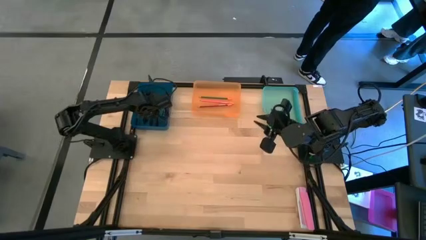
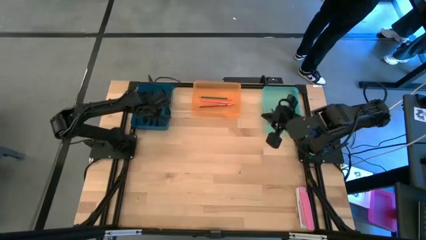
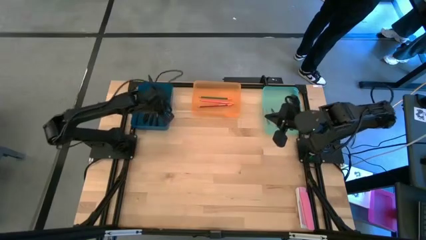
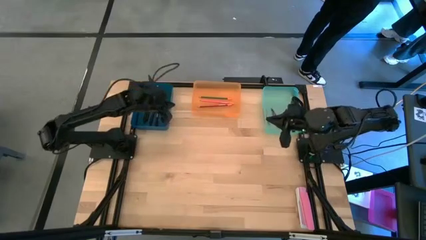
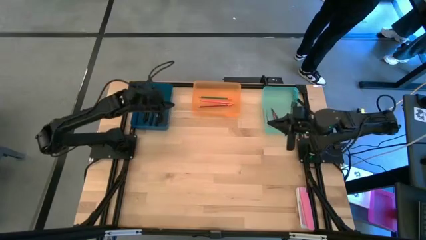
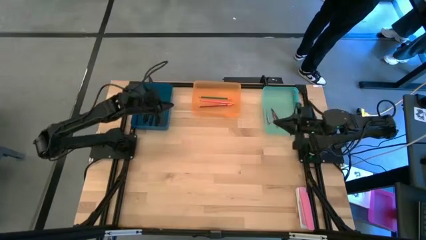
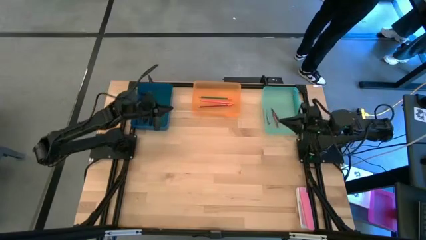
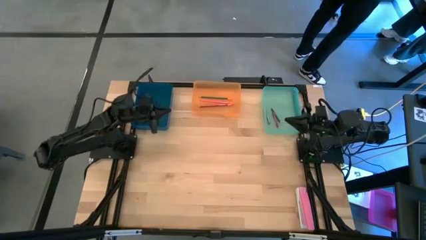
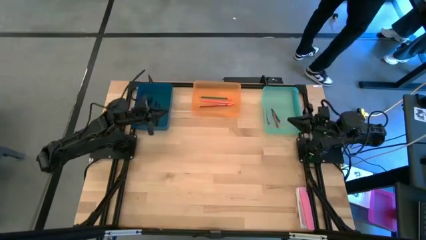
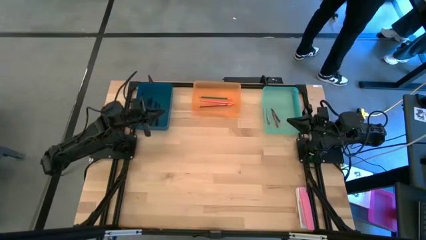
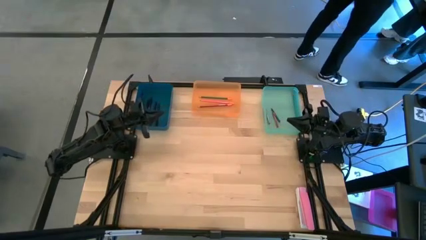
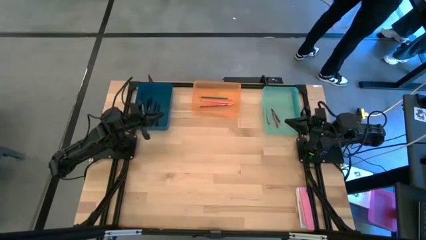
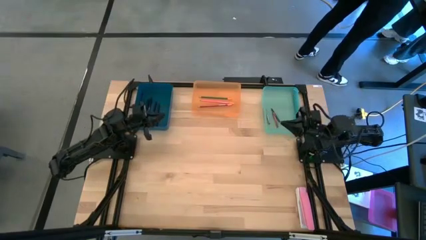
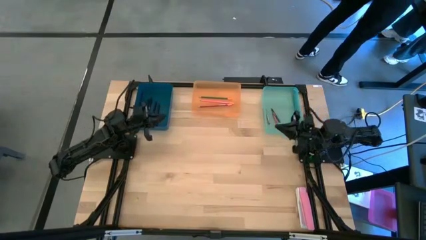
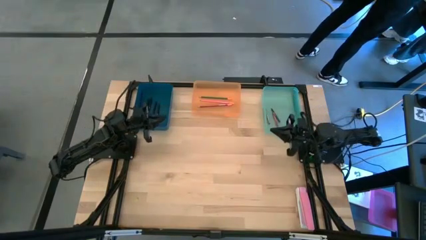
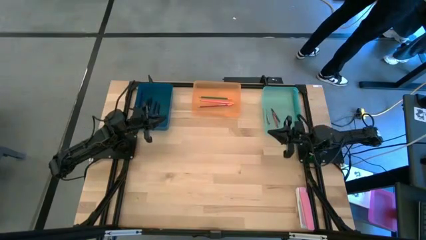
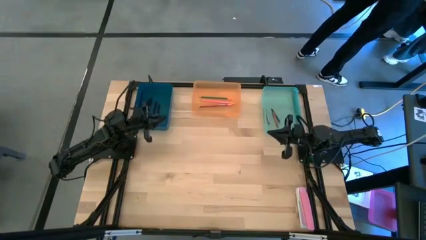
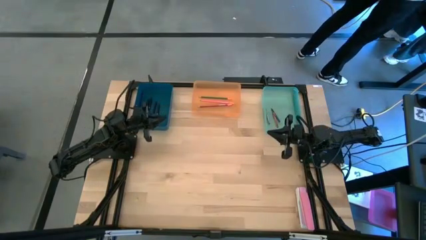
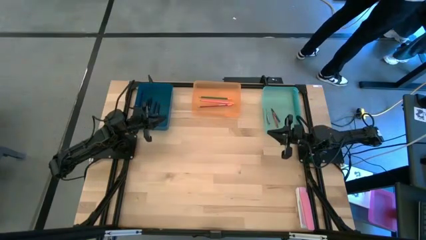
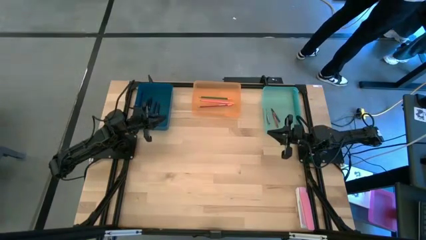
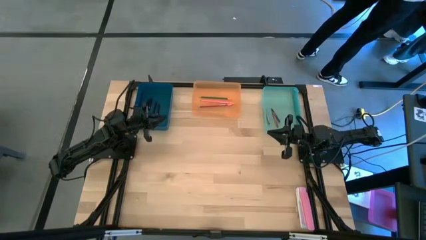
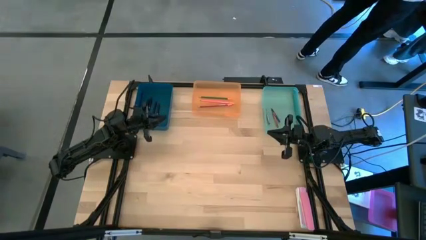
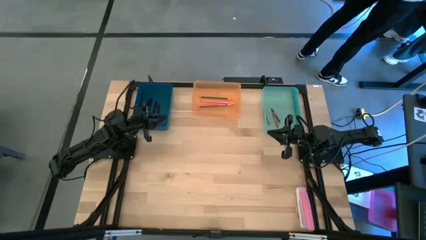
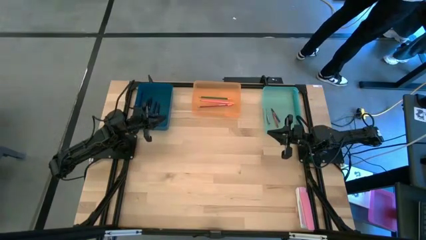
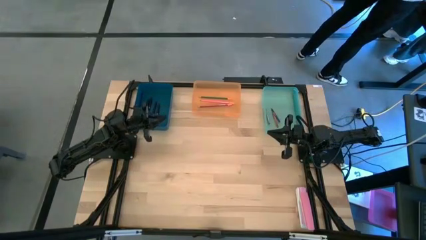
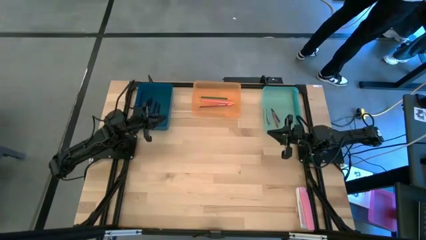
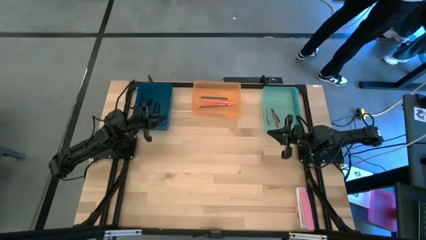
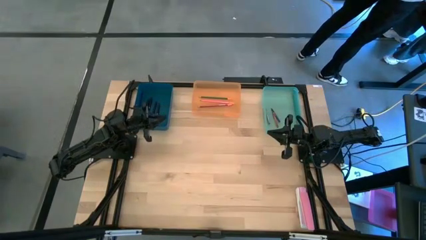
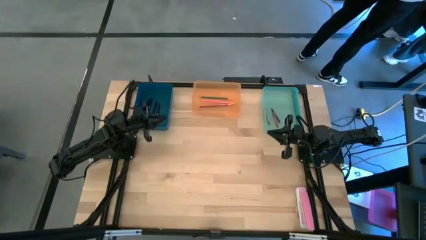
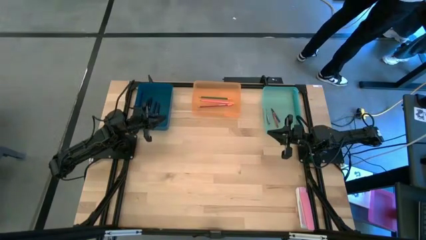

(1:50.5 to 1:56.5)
Task: Sort crayons/erasers/pens/pencils in bins
Return to Home Position

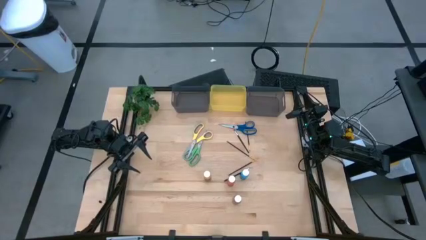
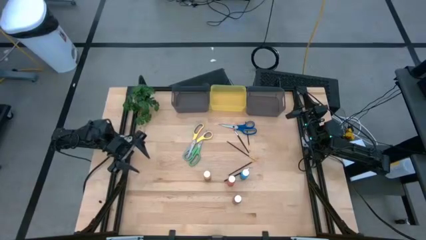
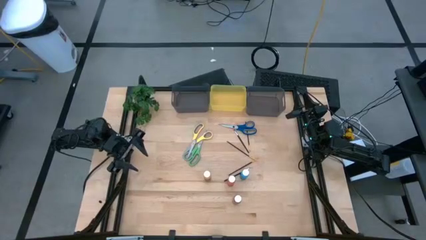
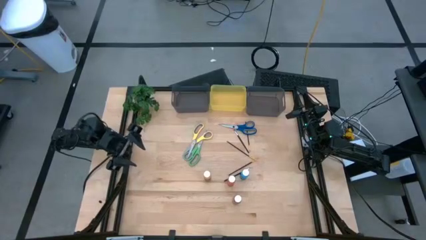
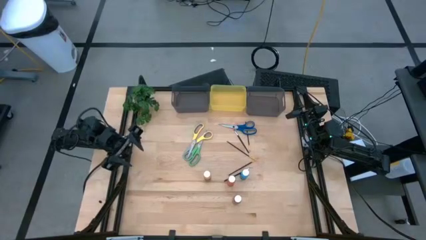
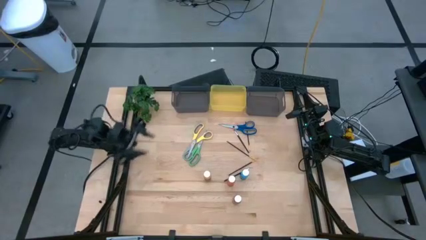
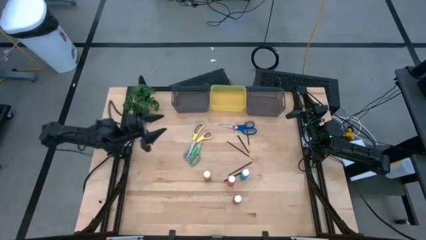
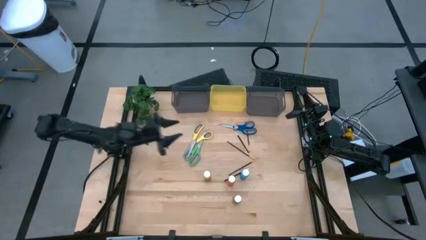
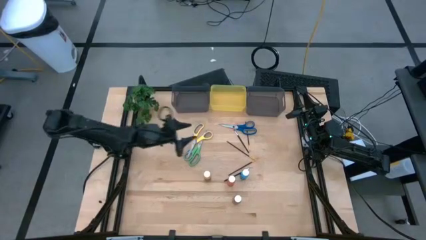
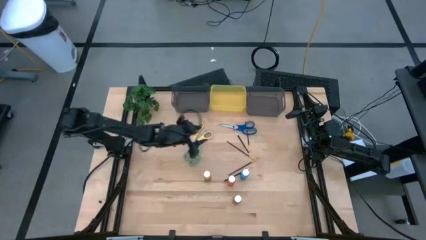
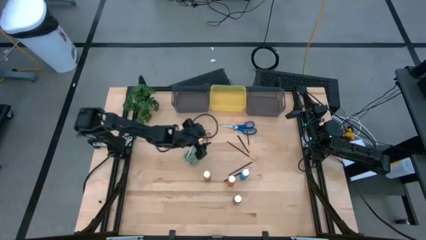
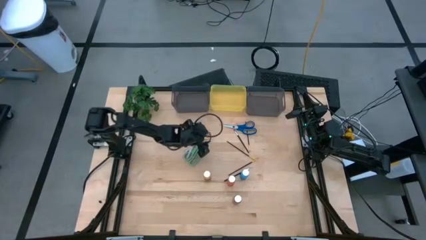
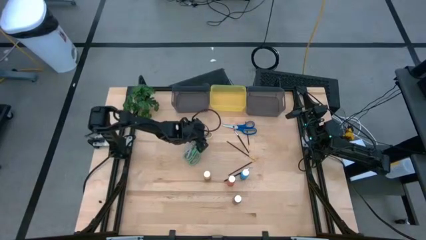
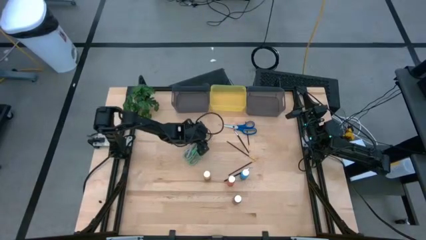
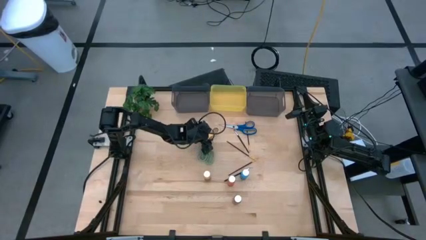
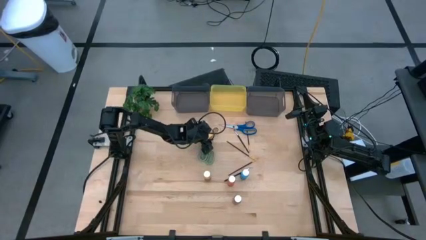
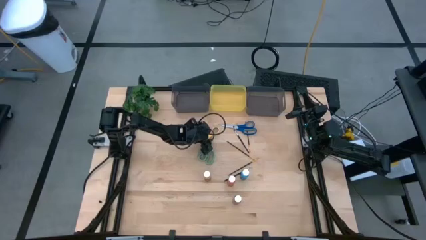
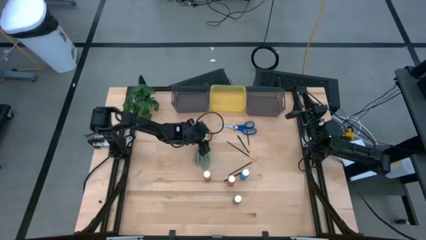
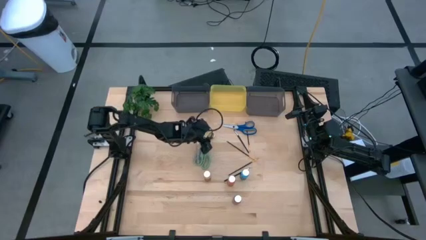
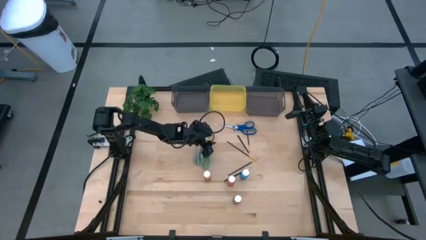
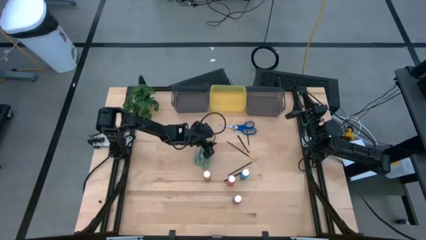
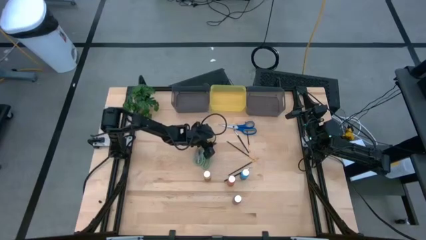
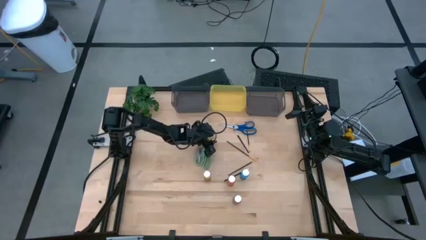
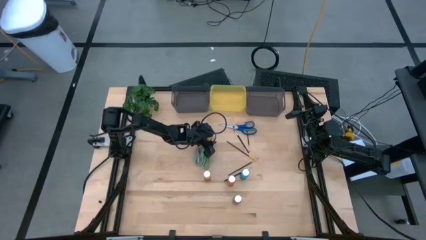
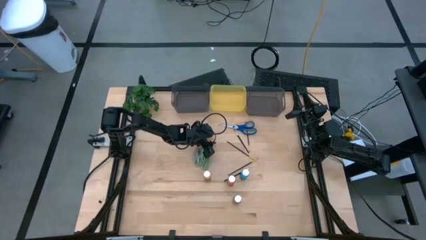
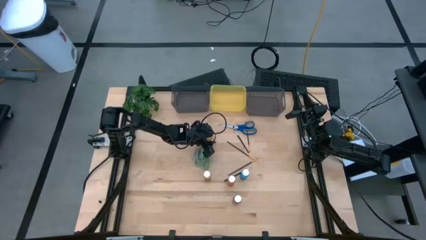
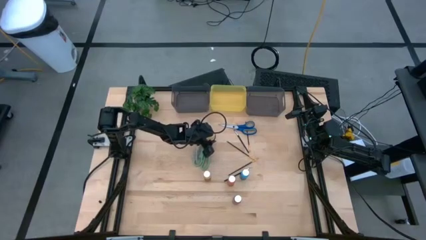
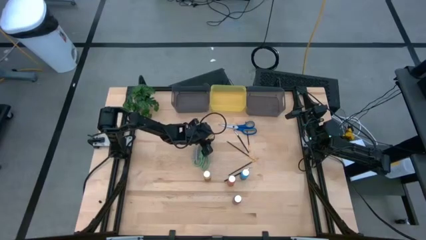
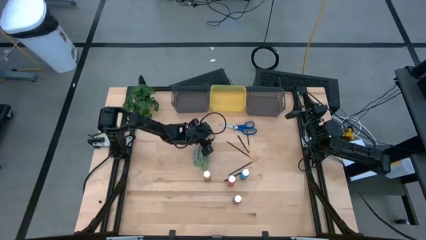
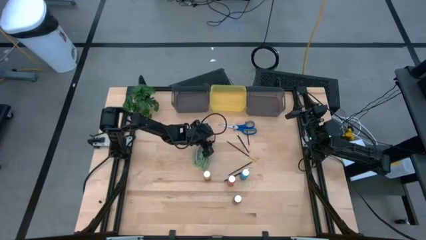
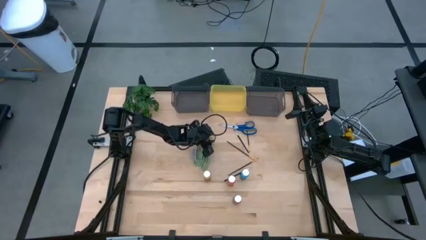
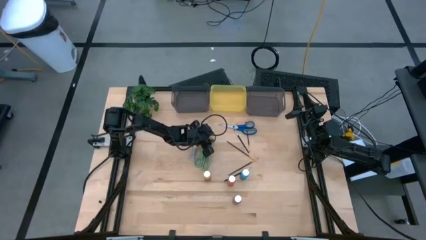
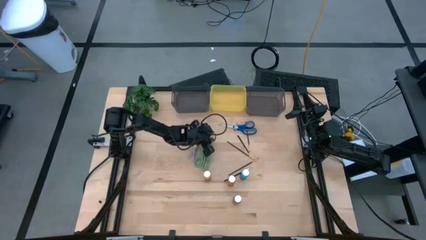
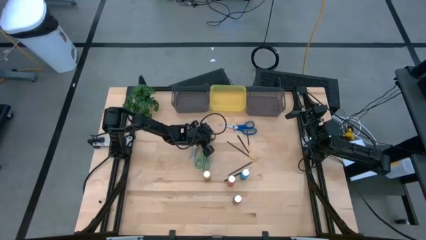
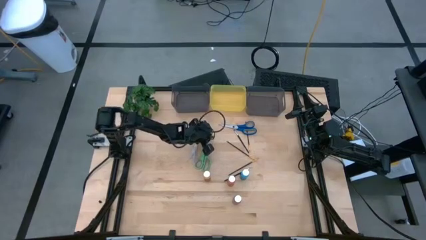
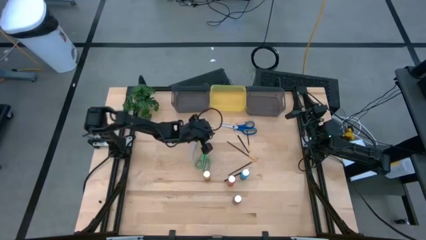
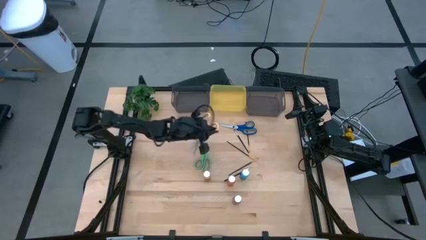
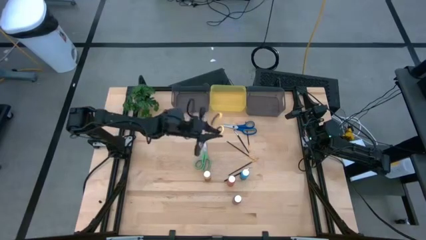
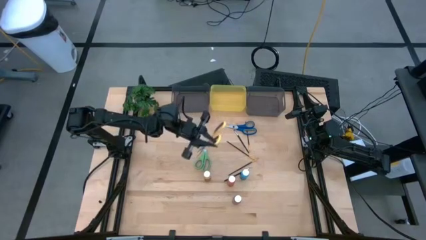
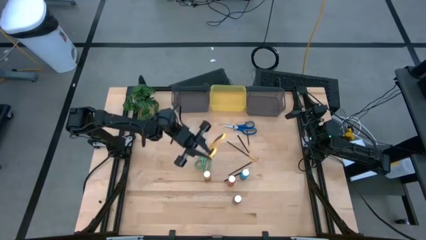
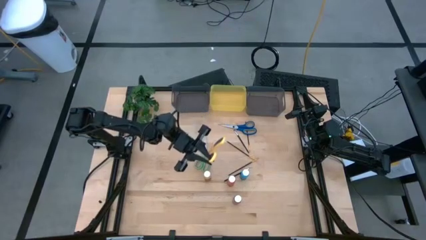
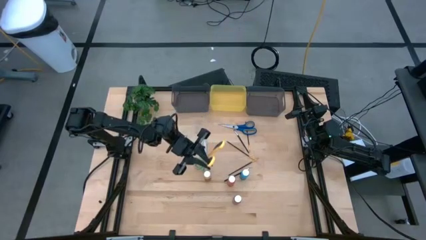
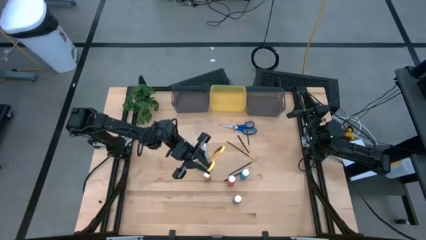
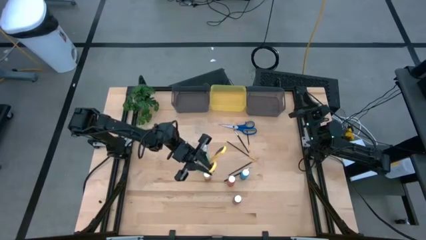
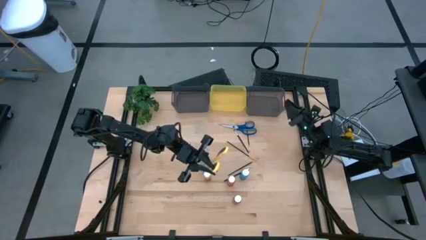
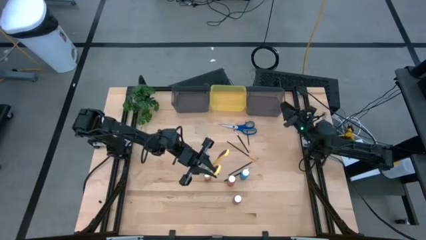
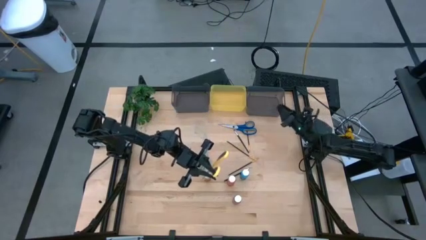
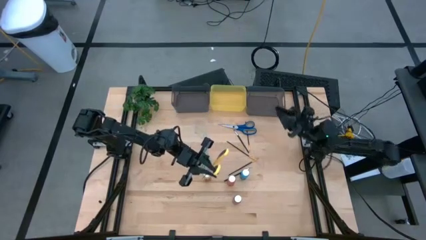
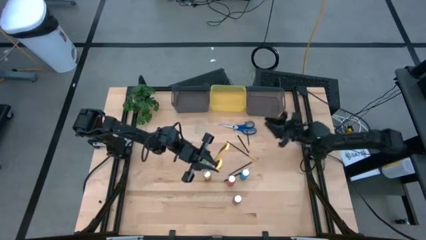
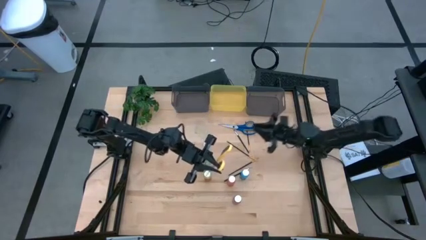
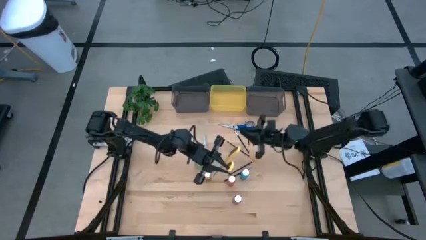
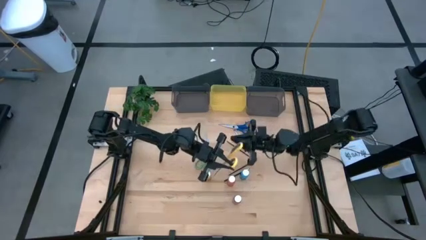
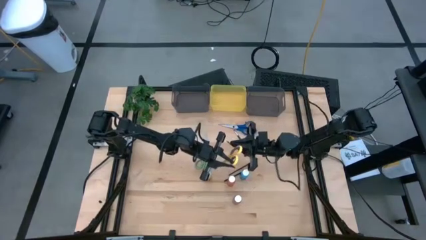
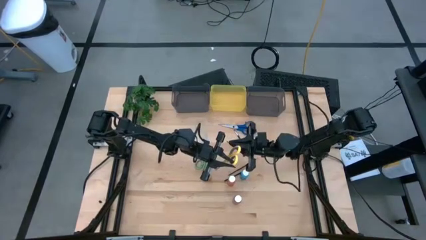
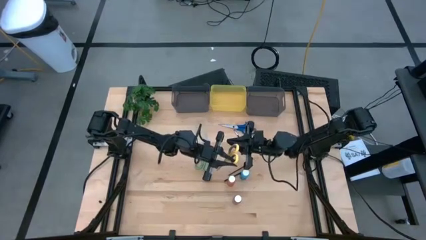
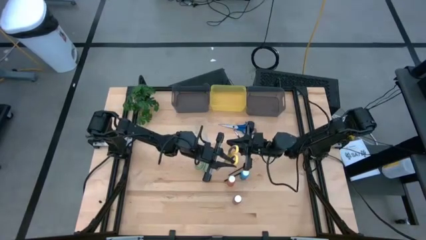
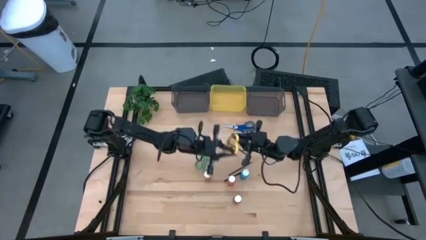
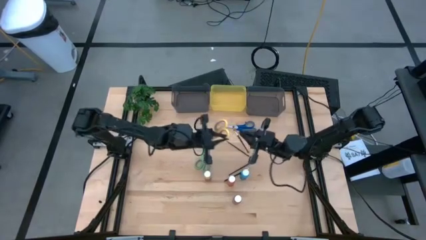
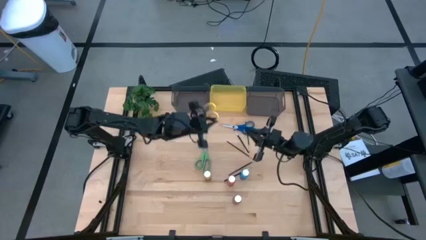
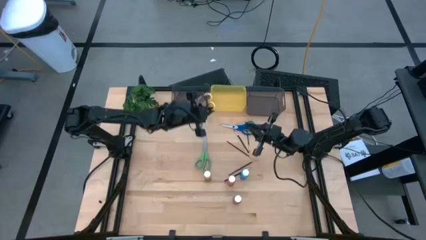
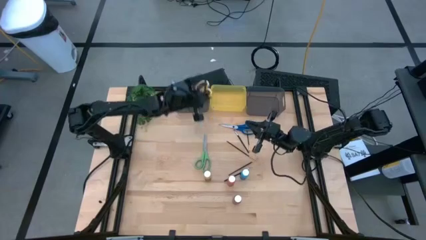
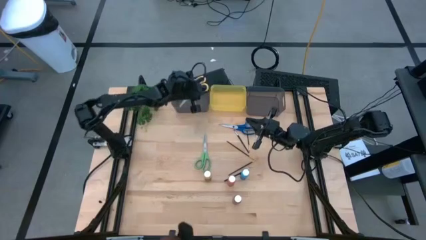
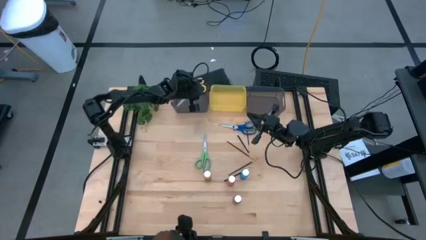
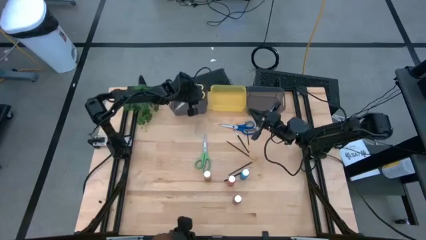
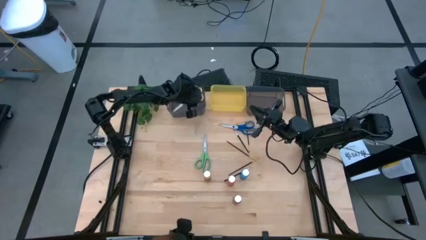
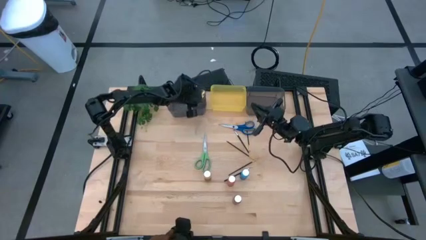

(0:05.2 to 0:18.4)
Task: Pick & Place Paint Supplies
Put the yellow scissors into the left black bin
